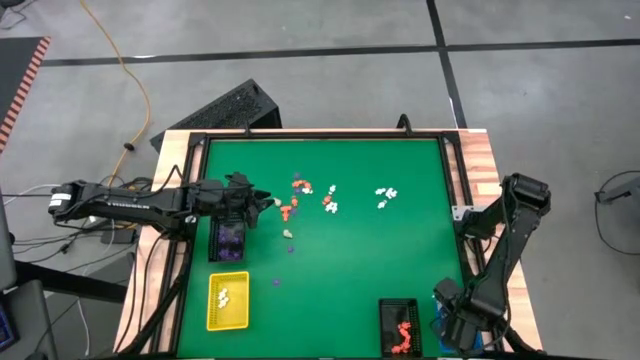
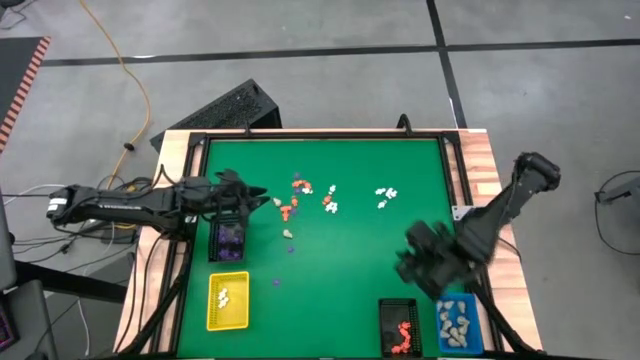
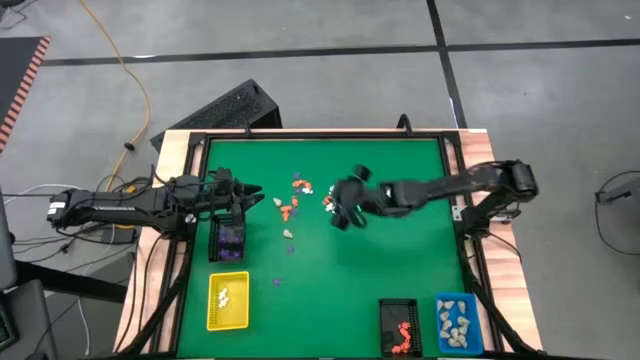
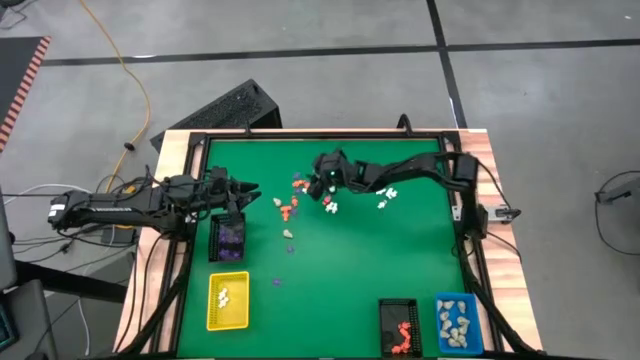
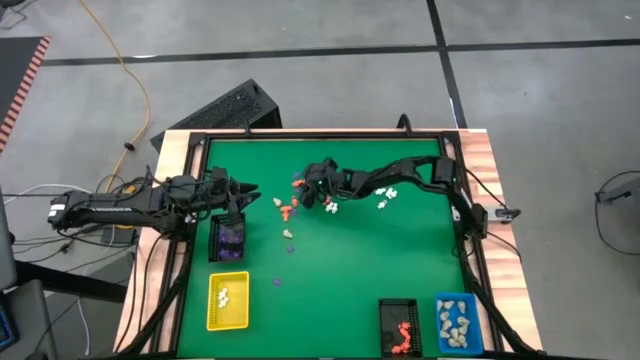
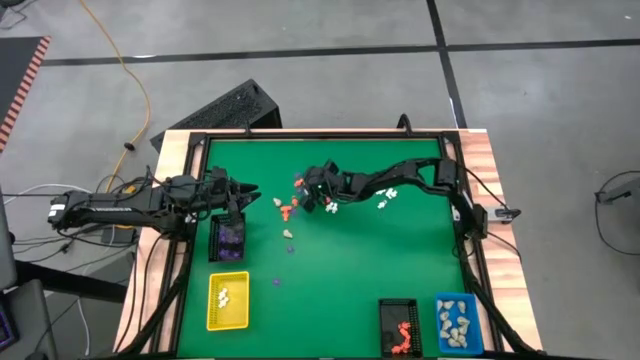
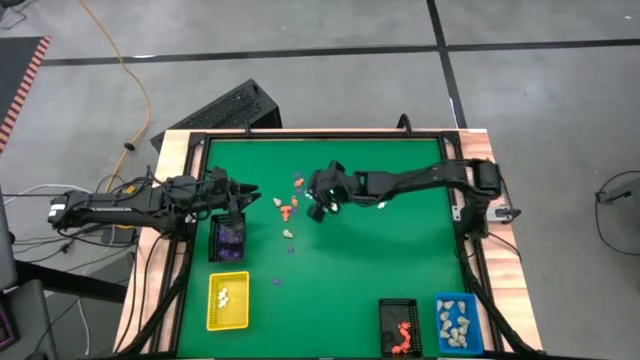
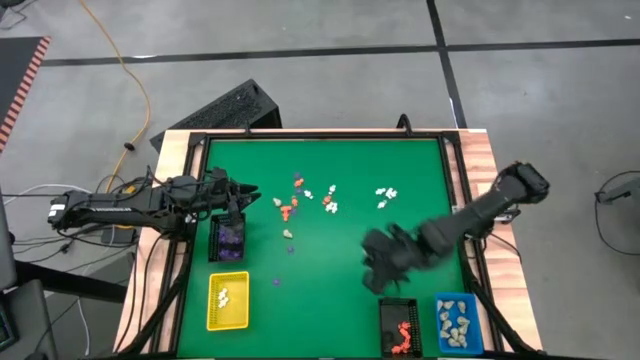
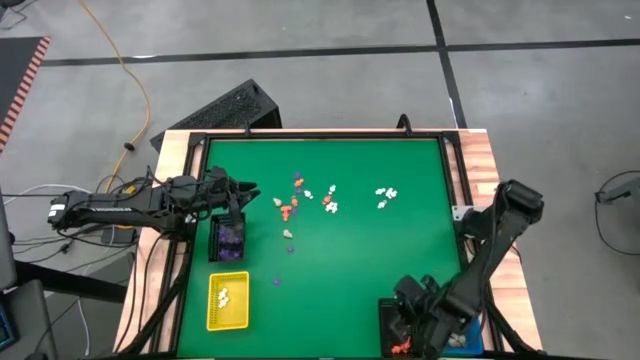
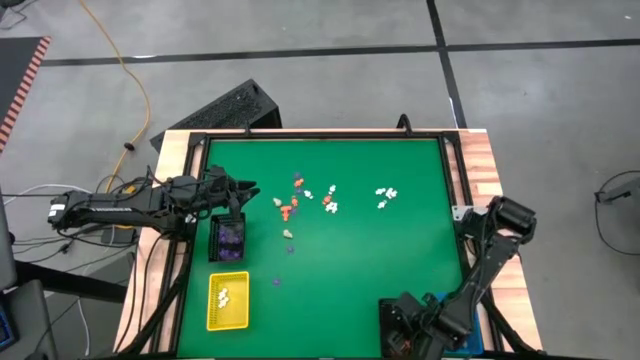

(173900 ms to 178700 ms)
Task: Sort Halloween decoration
Put the orange skeleton toy into the bottom black basket

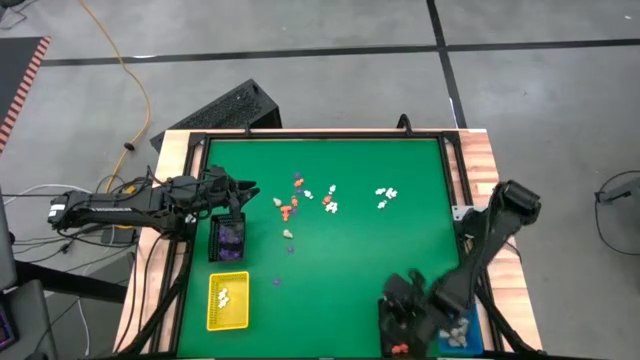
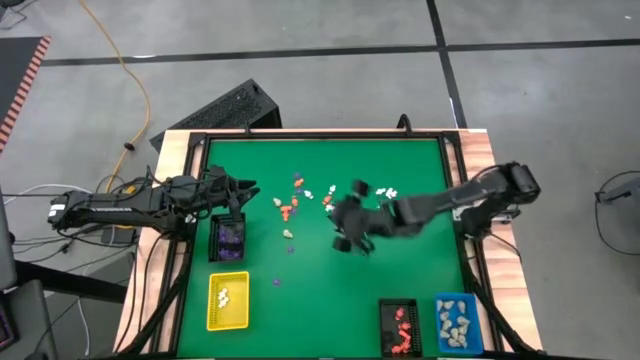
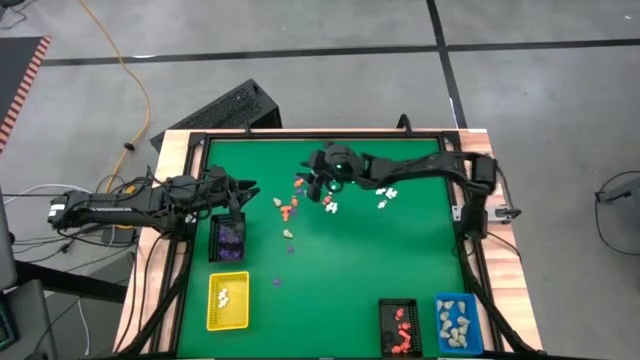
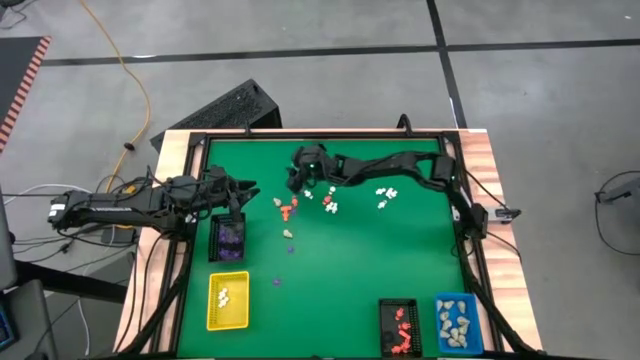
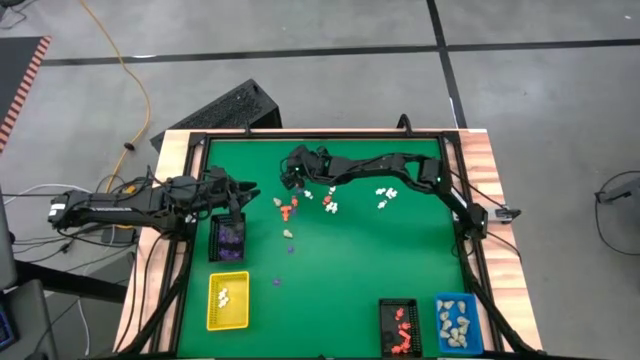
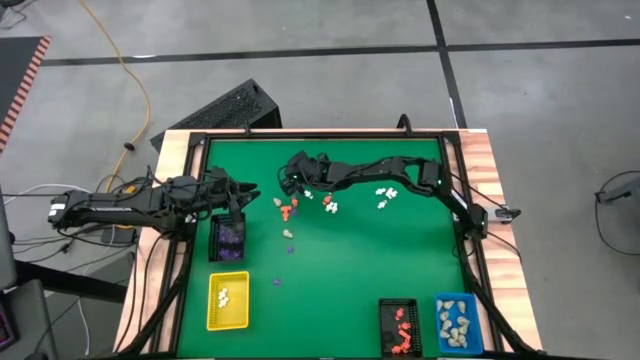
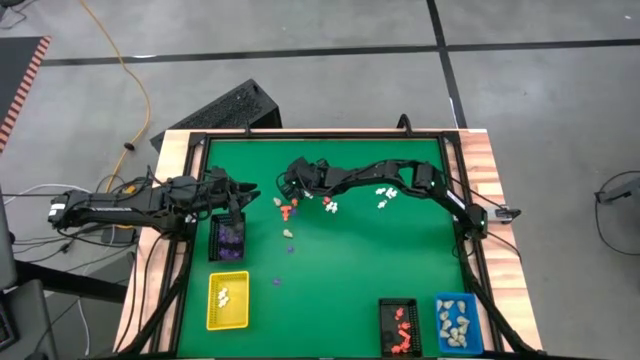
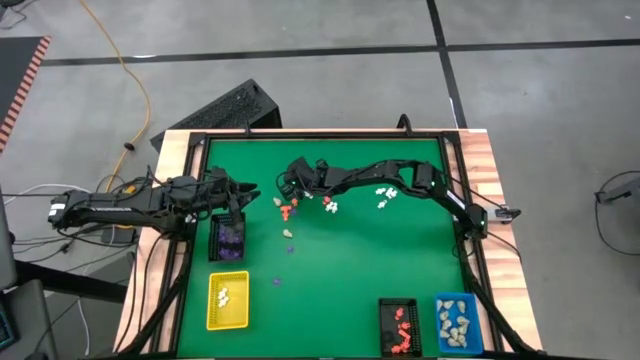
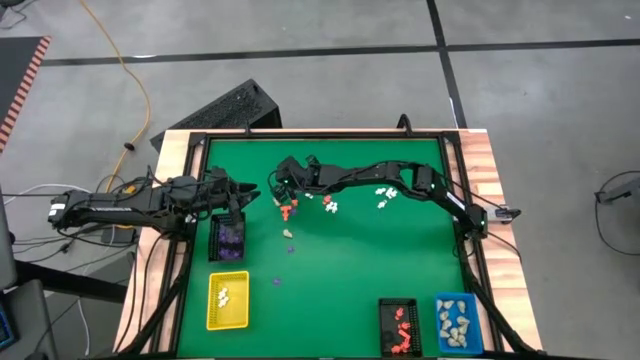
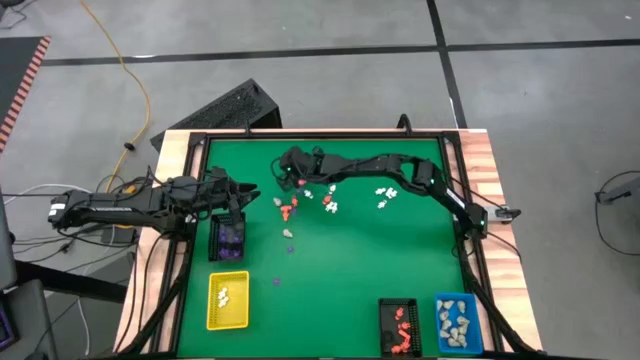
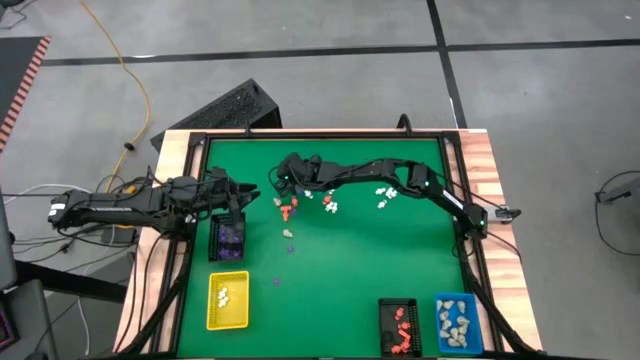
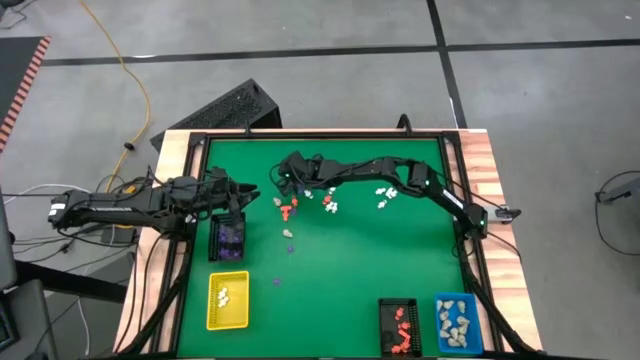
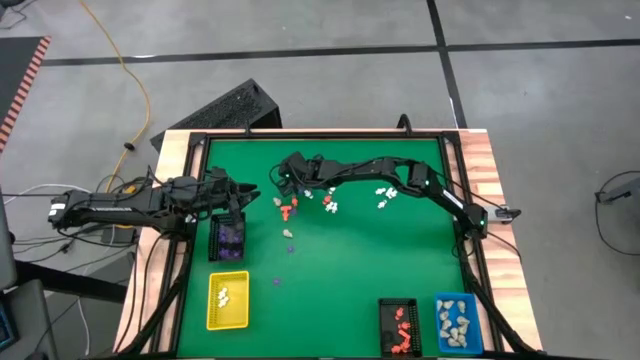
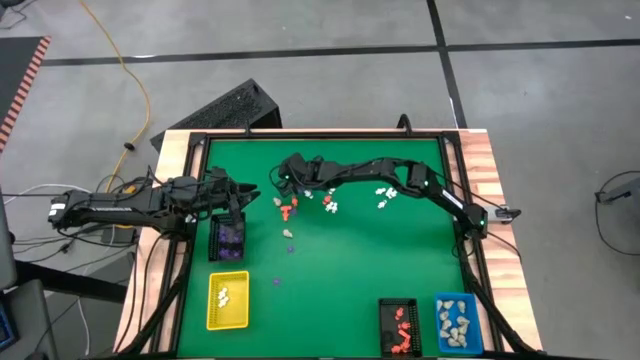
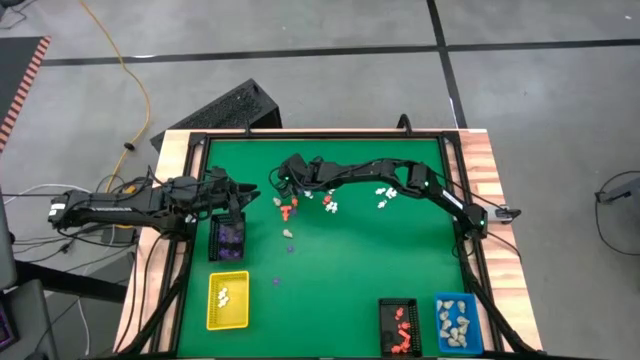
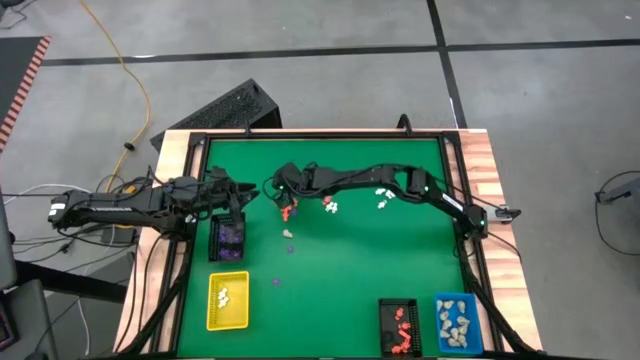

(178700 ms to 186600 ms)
Put the purple spider toy into the top black basket

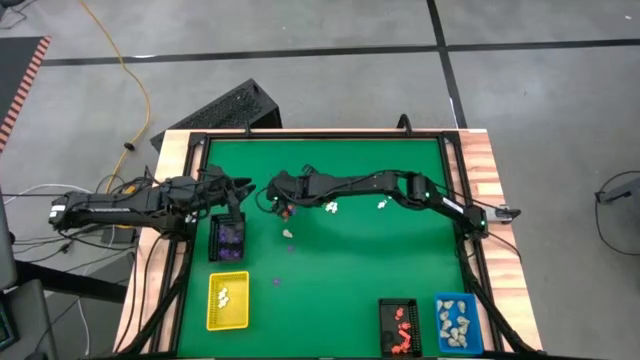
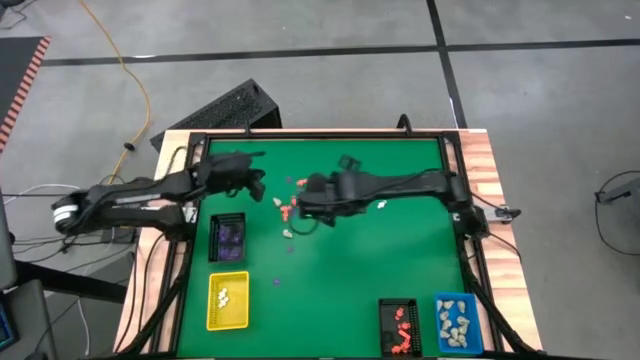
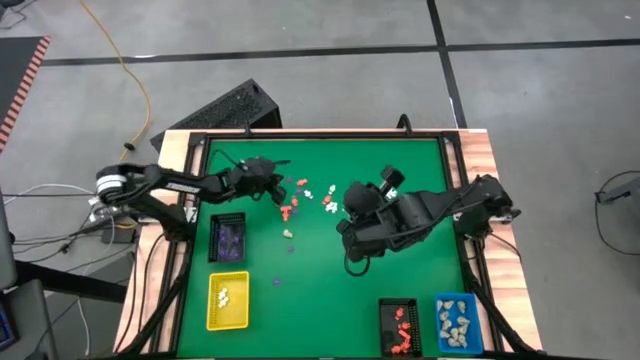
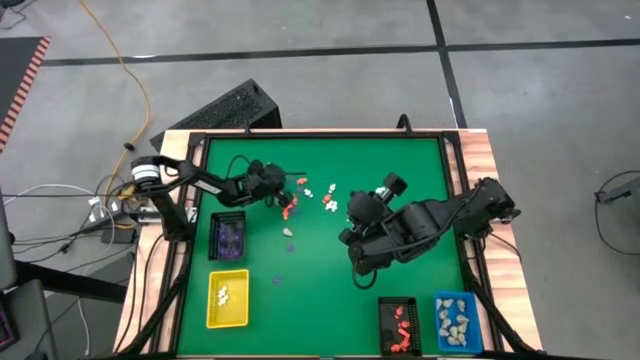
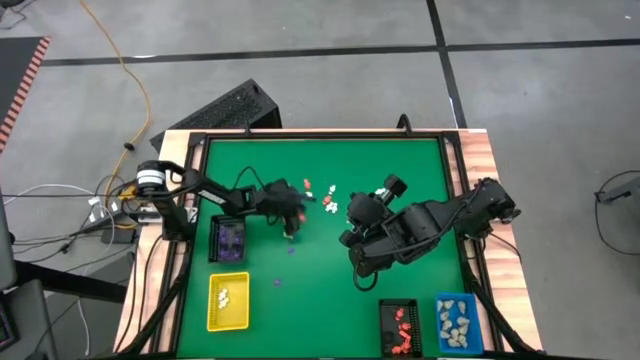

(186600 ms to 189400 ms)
Adjust the toys on the table

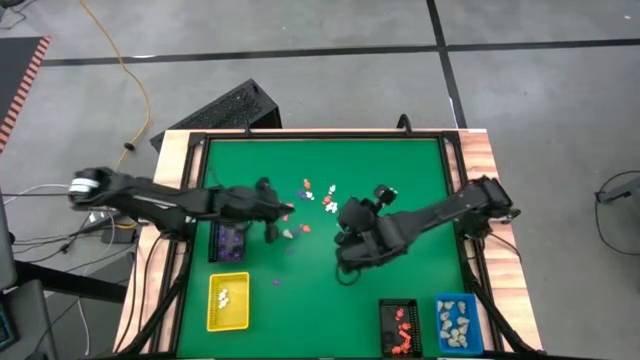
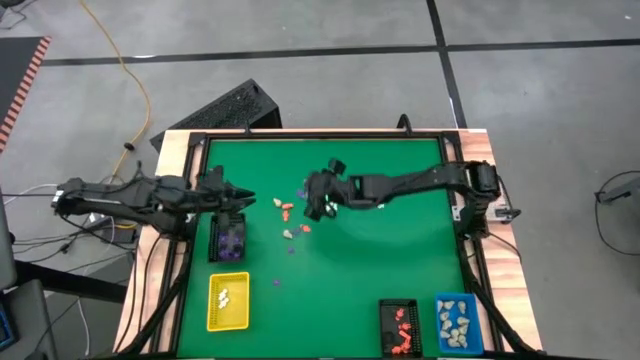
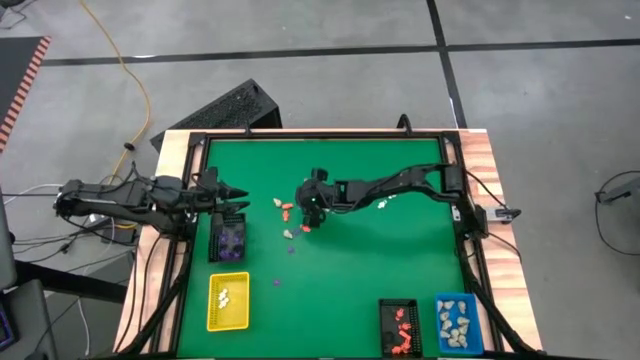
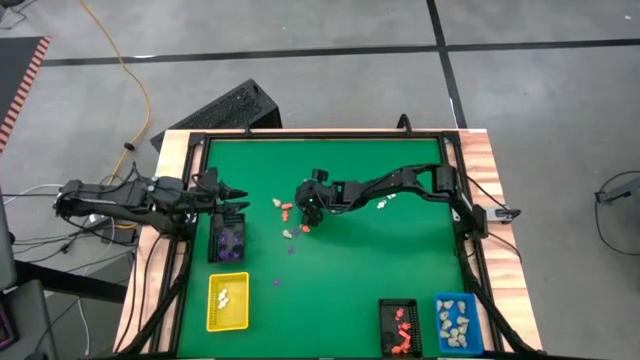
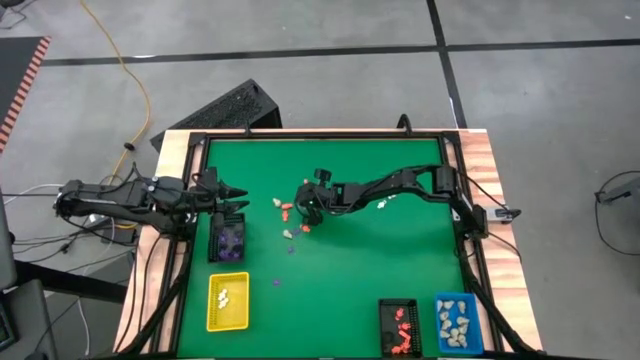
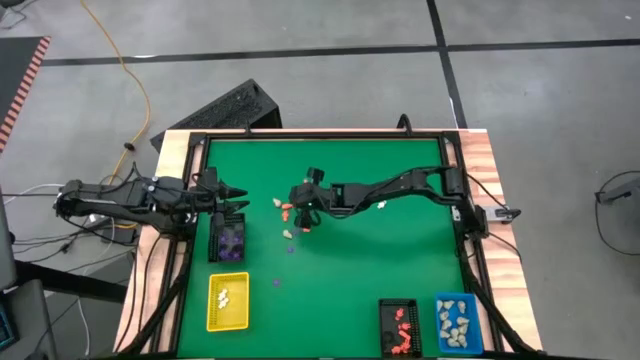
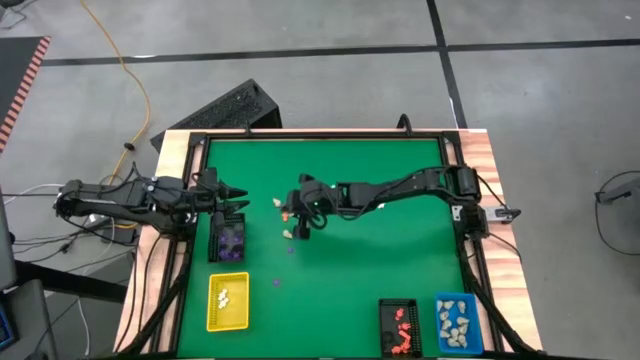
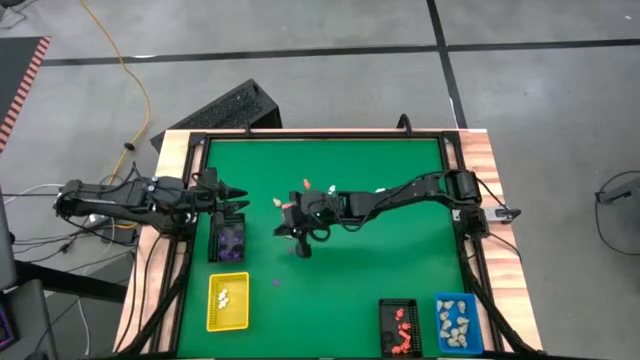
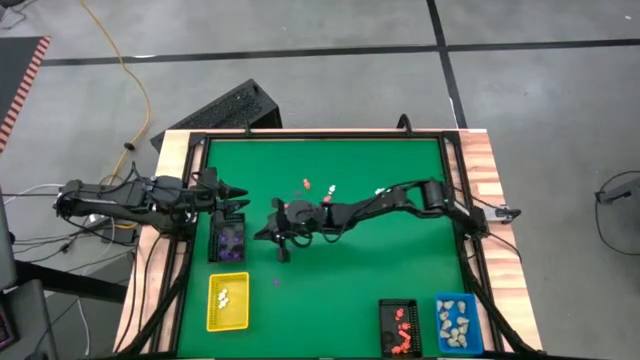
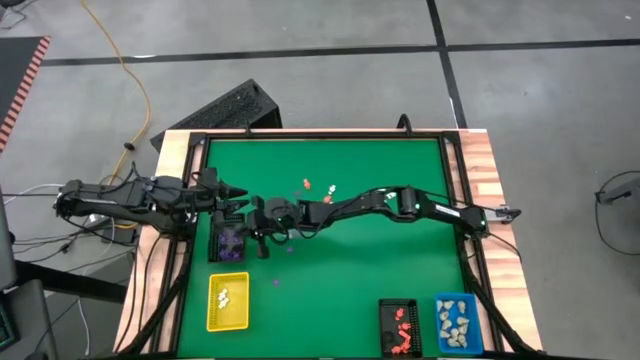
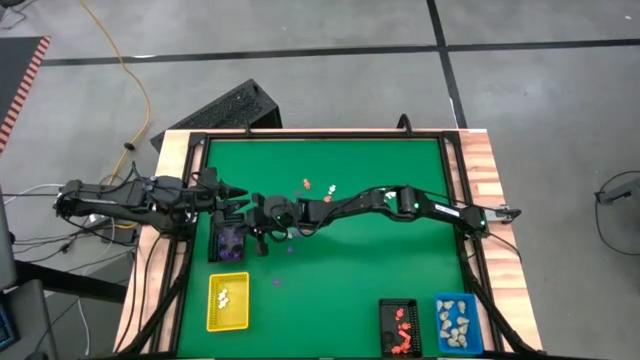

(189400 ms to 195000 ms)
Put the purple spider toy into the top black basket

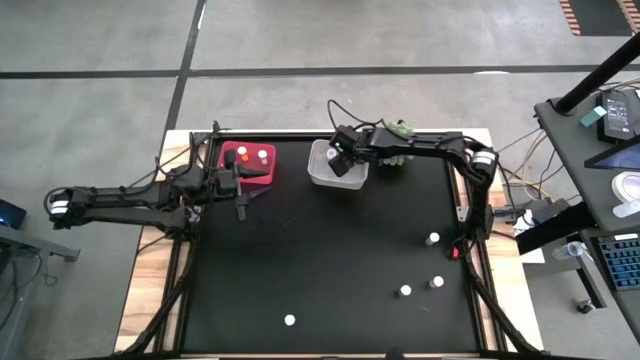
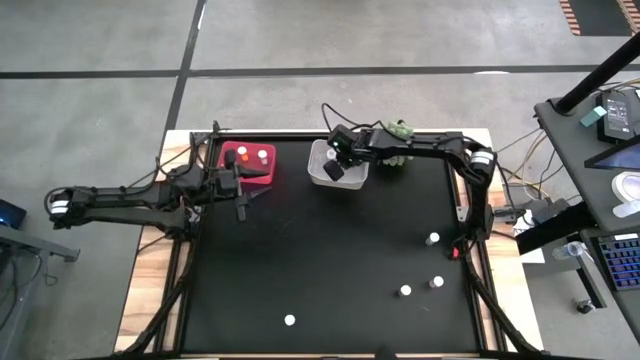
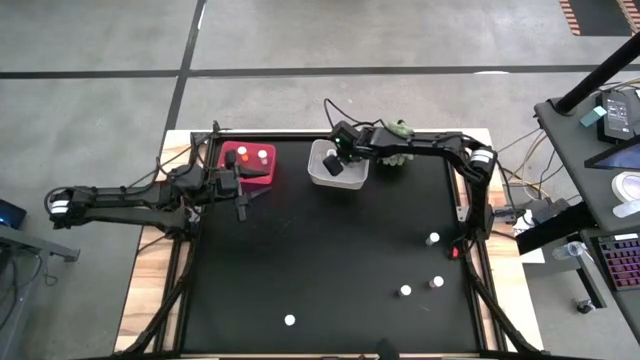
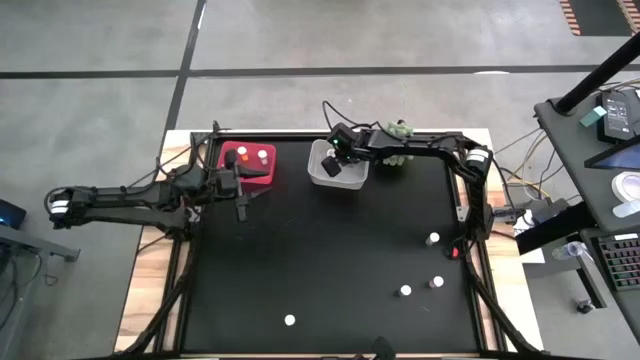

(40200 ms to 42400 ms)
Task: Pick and place medicine bottles into bin by pill shape (circle, oval)
Adjust the blue tablet bottle on the bin
